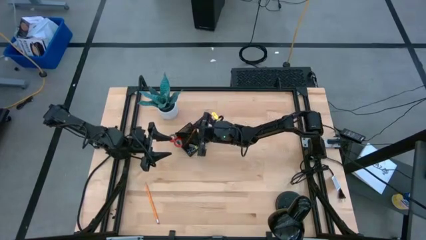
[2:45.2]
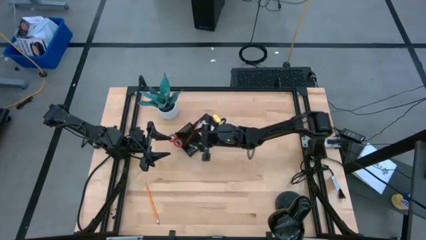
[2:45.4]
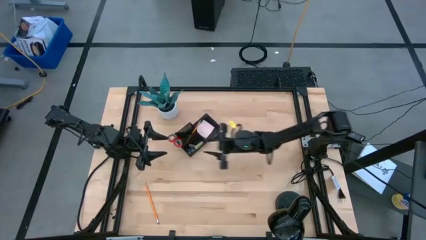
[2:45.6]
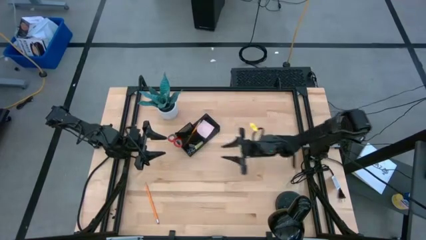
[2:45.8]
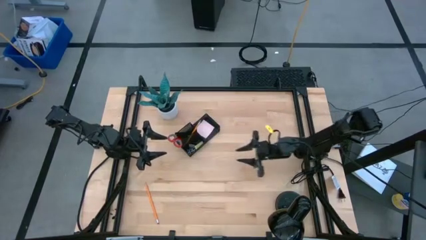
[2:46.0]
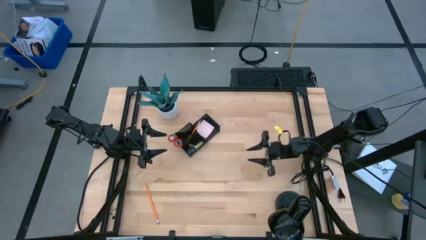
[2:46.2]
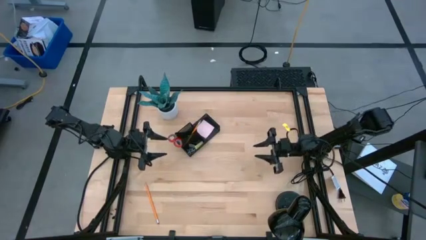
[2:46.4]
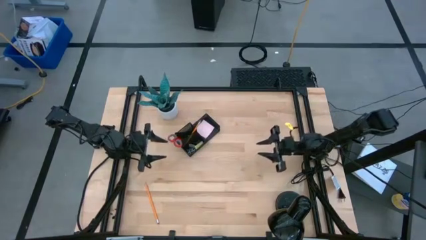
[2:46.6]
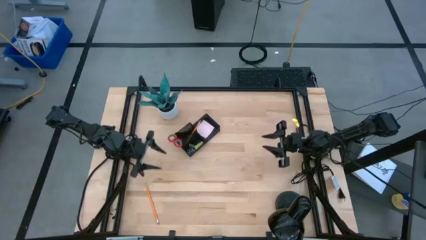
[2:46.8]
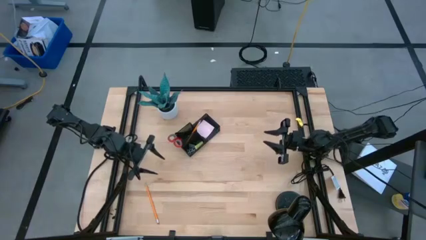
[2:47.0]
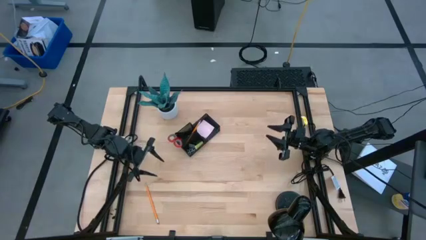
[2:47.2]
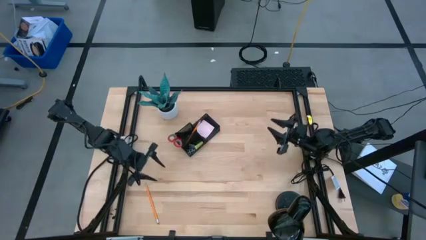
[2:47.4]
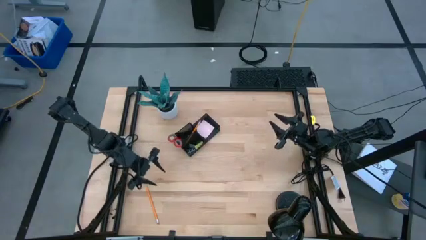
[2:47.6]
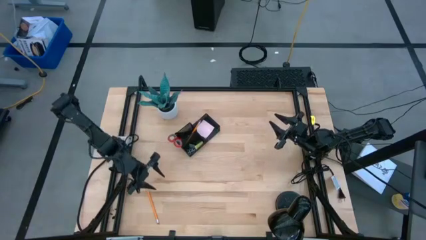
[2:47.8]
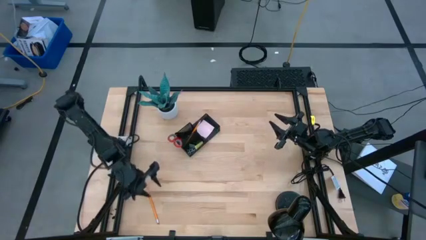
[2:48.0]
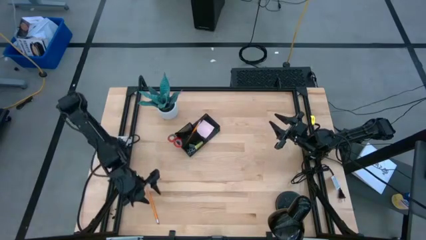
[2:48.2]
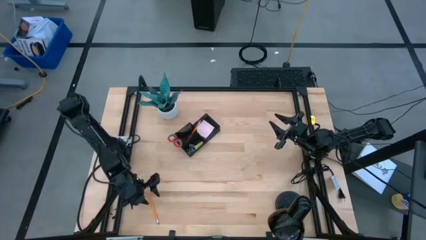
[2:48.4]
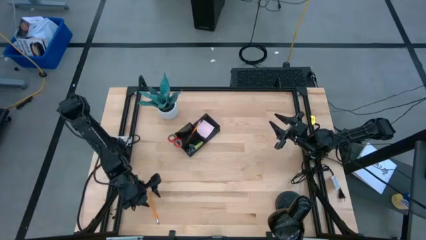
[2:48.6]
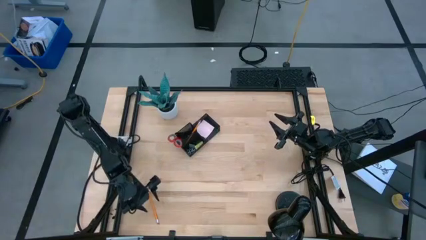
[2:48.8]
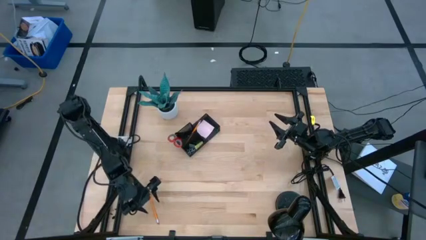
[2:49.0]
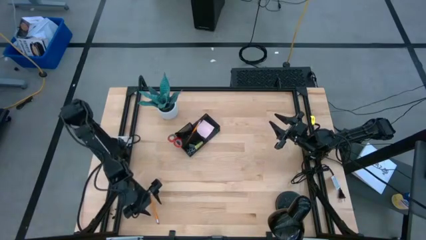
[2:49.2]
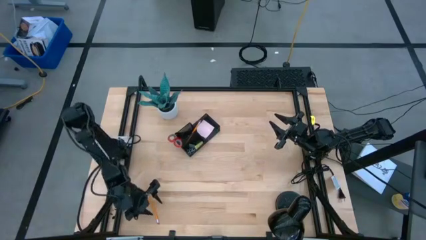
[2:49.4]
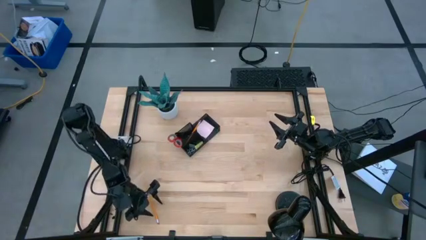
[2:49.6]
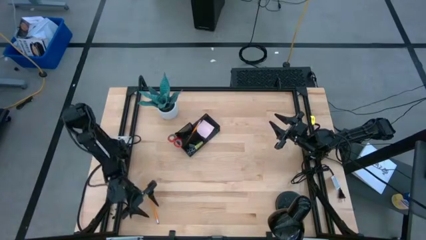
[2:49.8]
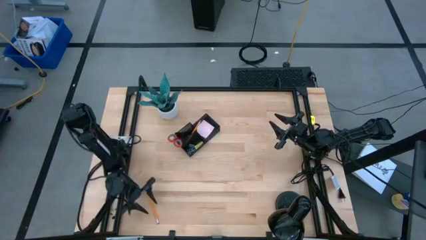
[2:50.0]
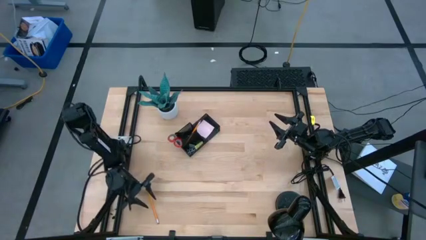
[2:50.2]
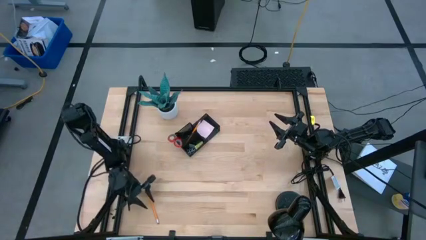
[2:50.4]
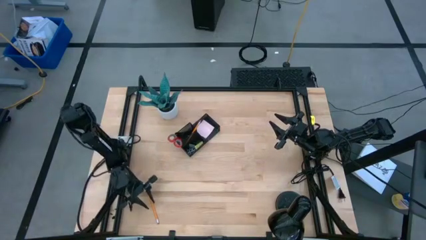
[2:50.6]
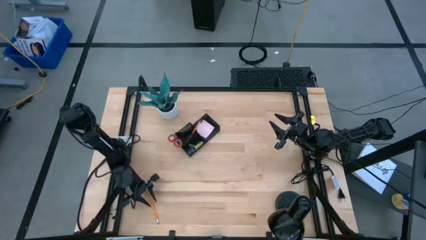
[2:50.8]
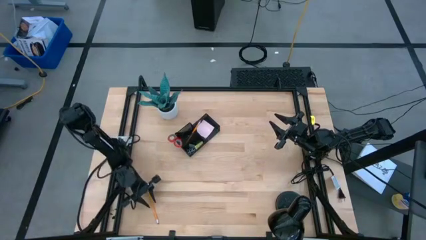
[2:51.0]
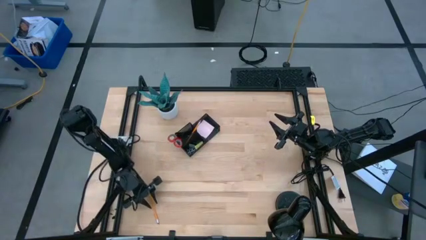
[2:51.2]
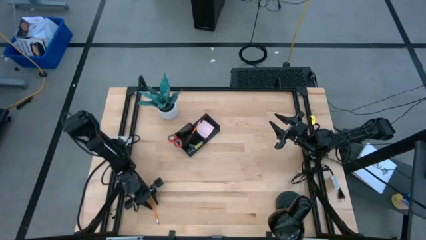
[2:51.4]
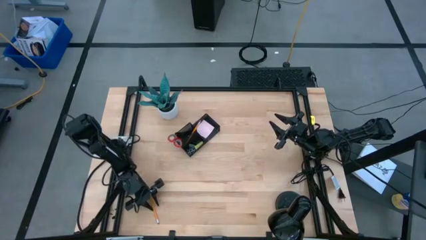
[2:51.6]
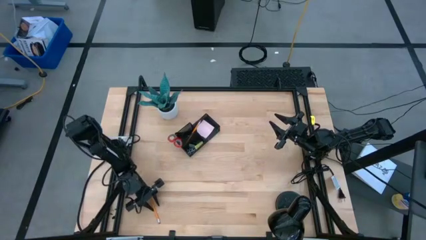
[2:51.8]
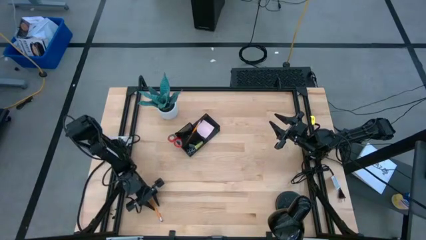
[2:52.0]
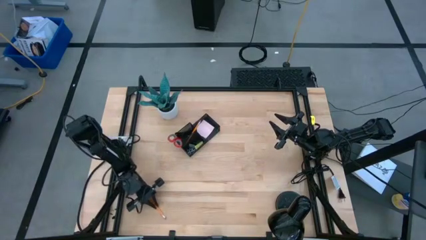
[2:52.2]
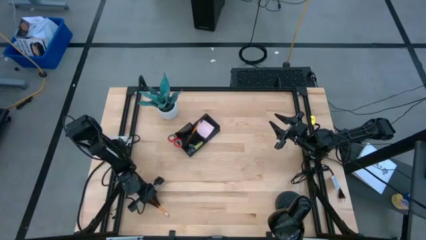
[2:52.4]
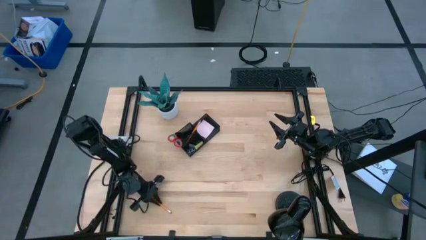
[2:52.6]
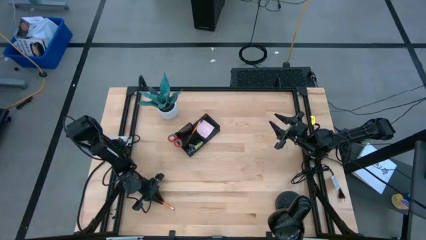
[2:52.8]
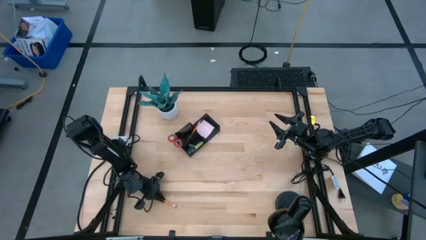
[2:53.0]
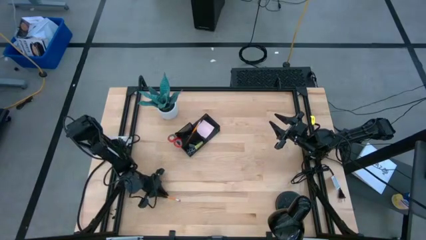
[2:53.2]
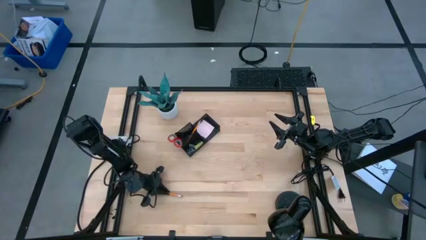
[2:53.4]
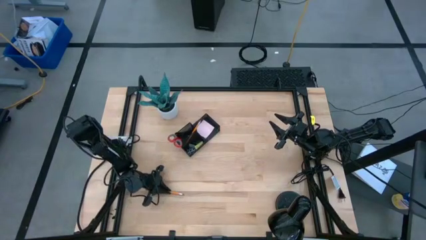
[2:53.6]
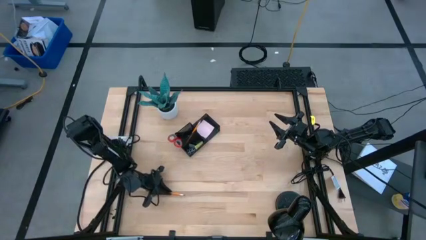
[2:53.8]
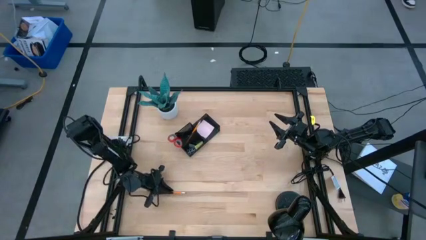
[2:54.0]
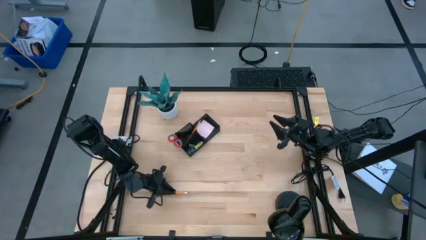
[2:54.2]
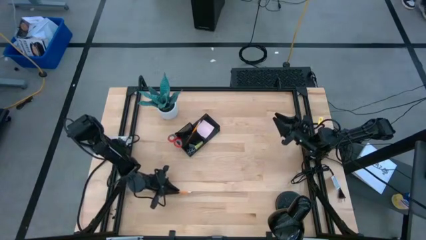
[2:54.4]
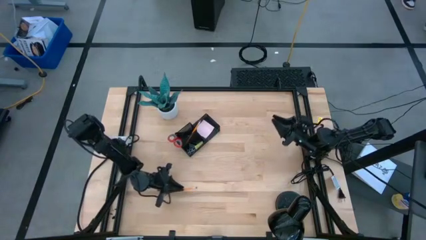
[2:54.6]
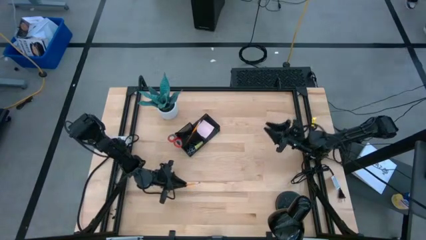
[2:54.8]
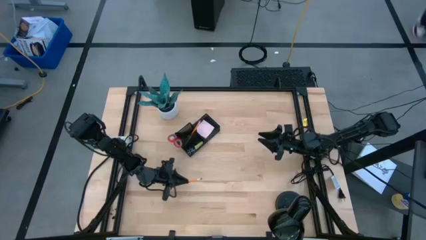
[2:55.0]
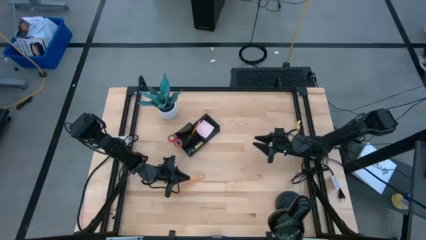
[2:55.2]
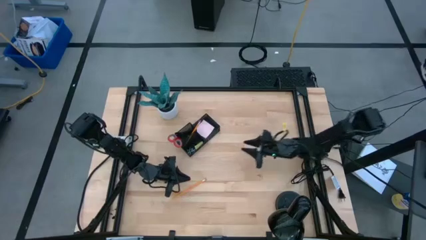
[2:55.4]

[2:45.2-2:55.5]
Task: Pick and place office supplies into organizer
Put the orange pencil into the black desk organizer

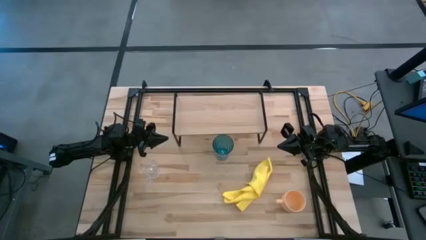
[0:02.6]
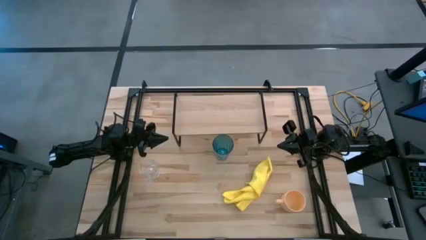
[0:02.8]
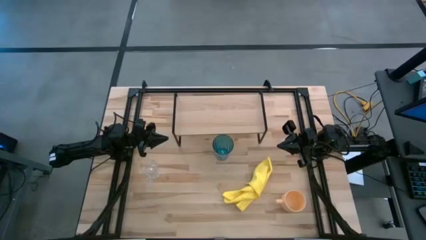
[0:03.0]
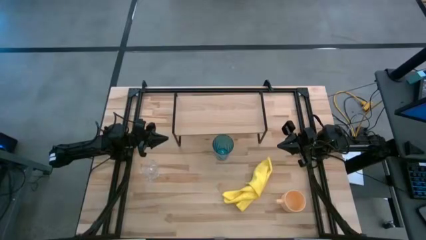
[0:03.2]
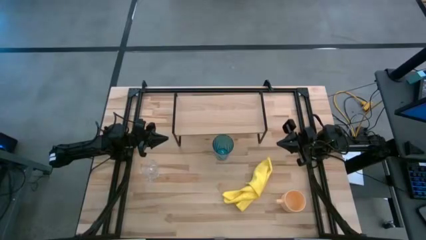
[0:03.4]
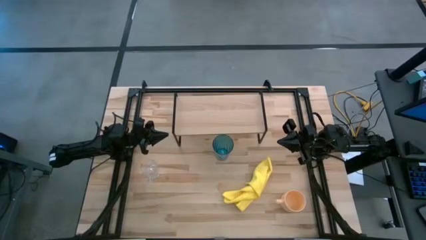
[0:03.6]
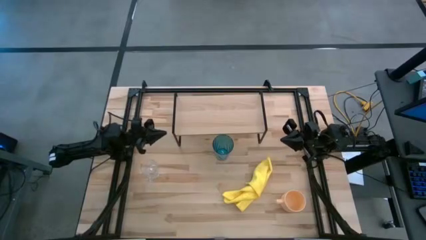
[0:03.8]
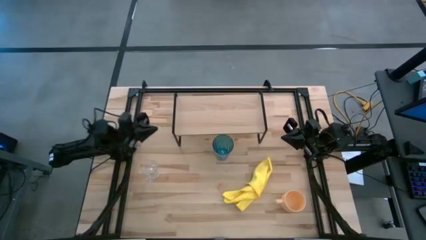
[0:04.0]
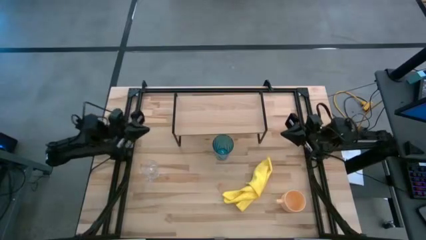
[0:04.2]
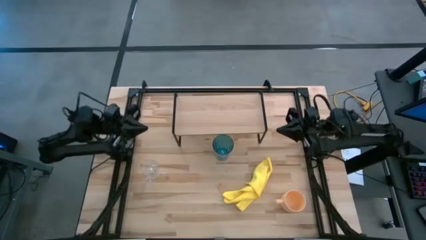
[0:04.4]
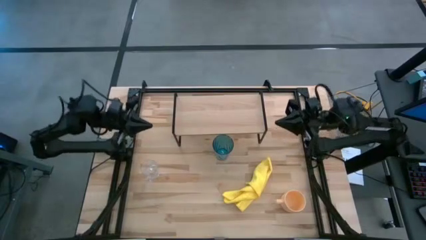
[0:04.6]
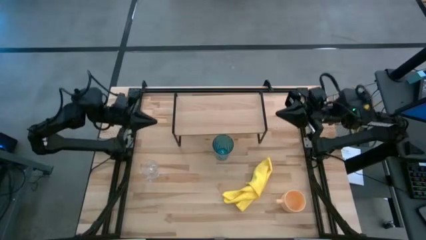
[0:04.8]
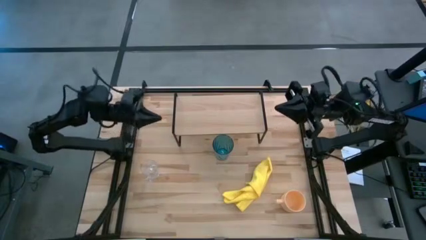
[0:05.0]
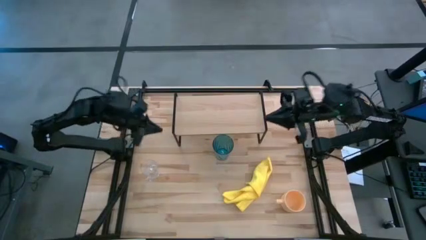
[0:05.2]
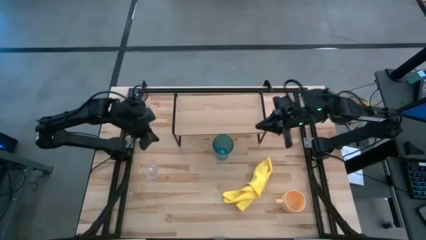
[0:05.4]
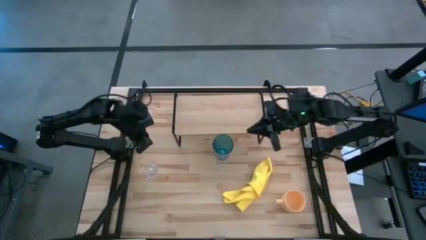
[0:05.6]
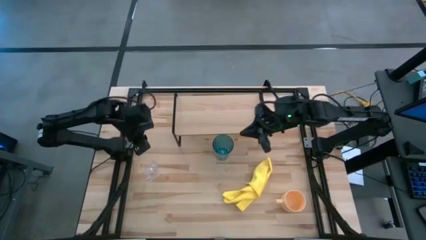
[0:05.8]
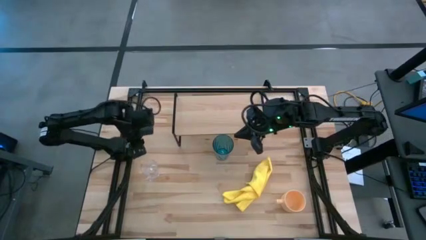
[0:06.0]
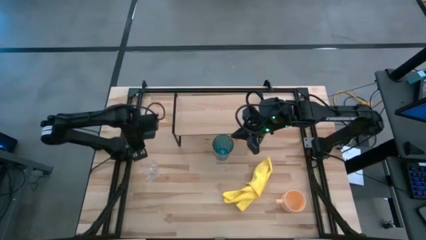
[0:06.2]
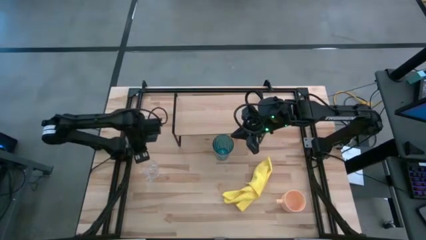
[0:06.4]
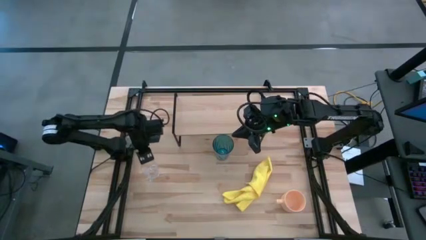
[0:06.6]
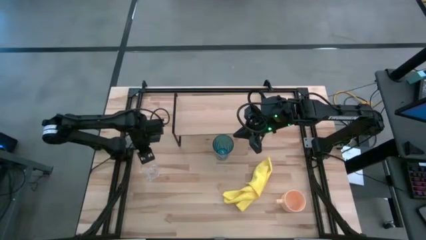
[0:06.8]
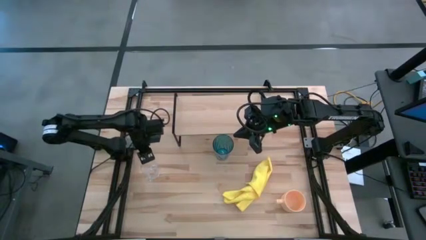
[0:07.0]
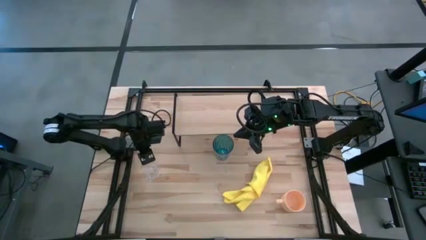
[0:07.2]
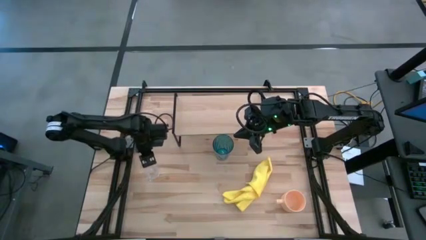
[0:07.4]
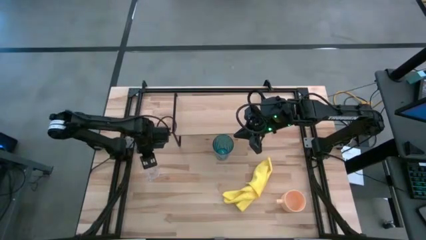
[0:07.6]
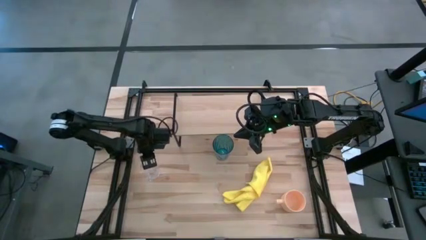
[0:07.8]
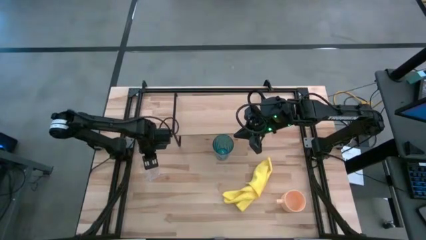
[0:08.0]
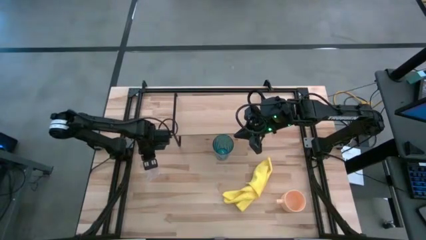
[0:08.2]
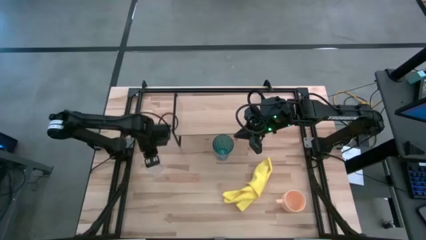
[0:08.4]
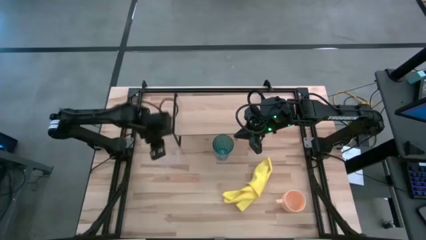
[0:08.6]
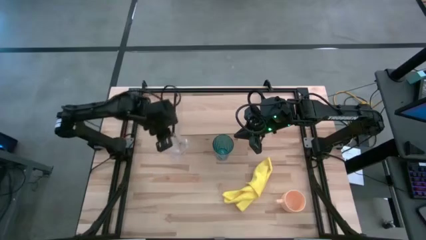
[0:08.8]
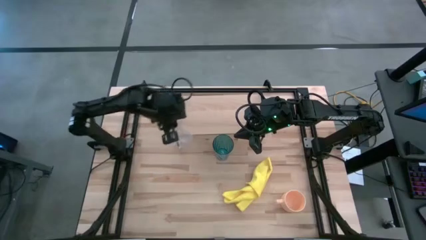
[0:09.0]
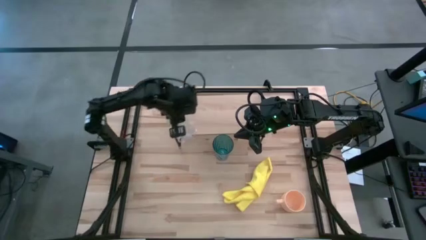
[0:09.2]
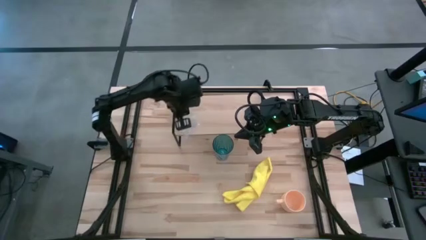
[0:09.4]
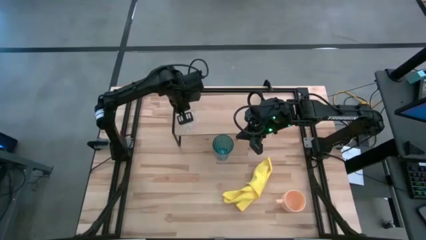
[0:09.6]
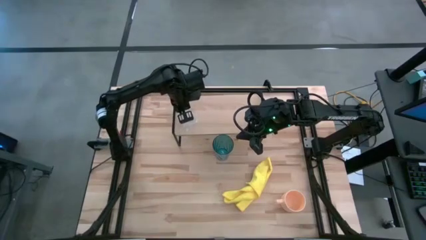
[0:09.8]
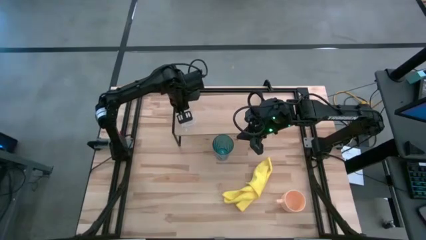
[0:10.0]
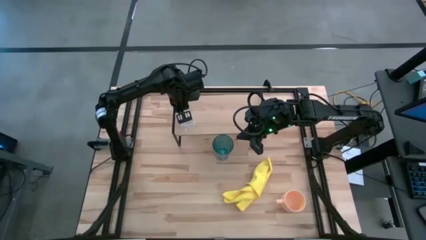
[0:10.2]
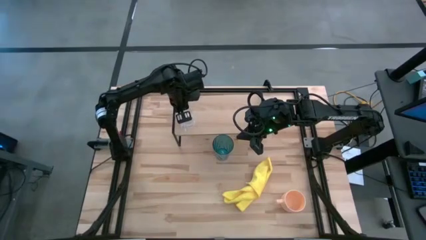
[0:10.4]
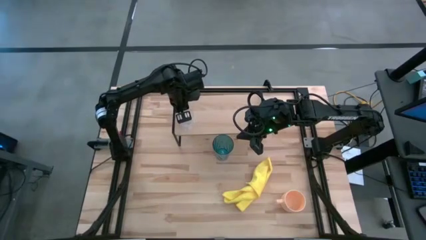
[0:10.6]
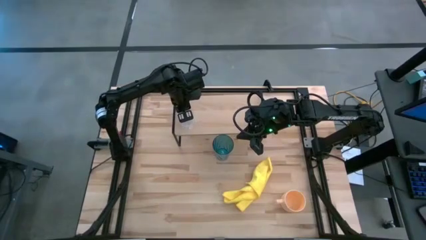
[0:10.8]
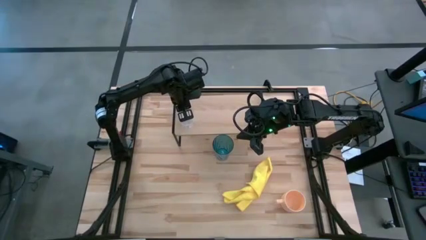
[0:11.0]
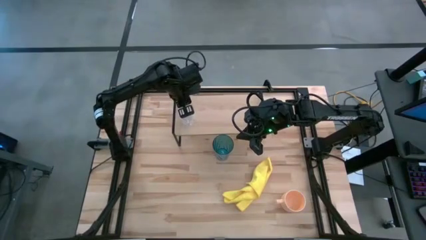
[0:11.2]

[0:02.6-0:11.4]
Task: Stack small to large cups/mugs on shelf
Put the transparent mug on the shelf
